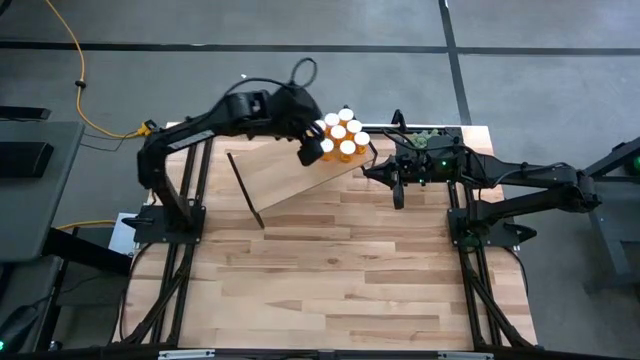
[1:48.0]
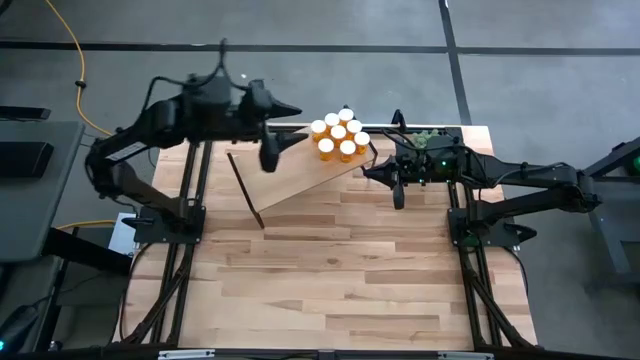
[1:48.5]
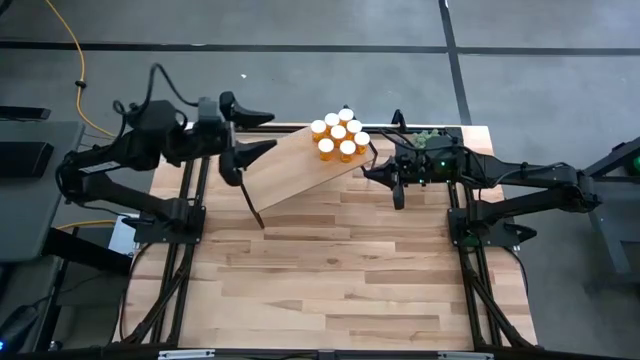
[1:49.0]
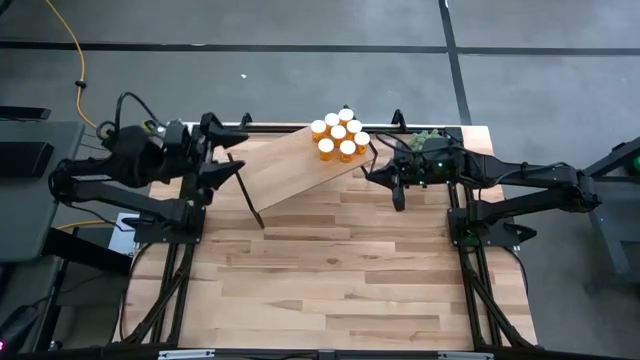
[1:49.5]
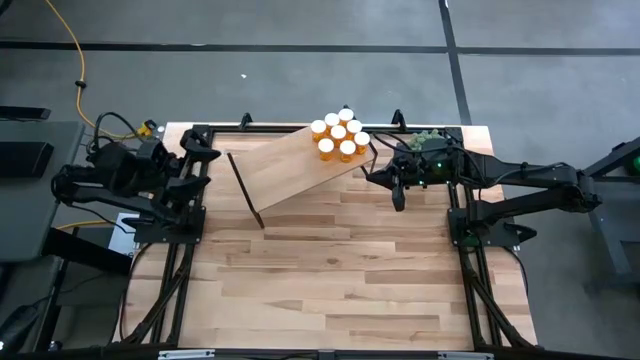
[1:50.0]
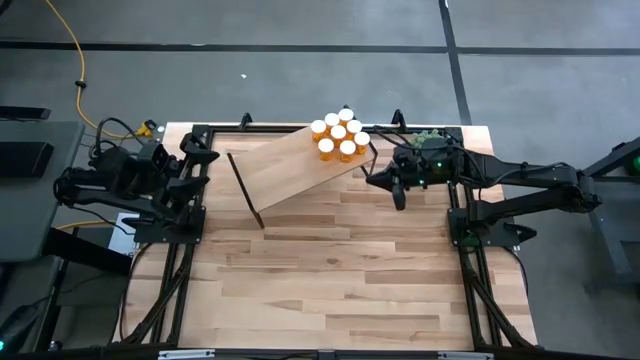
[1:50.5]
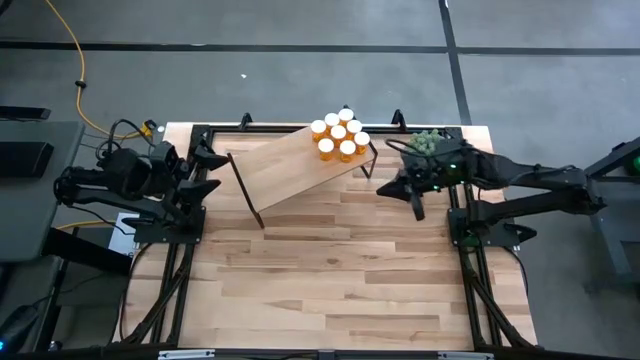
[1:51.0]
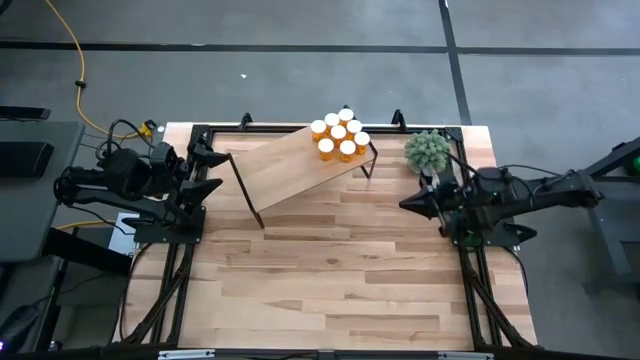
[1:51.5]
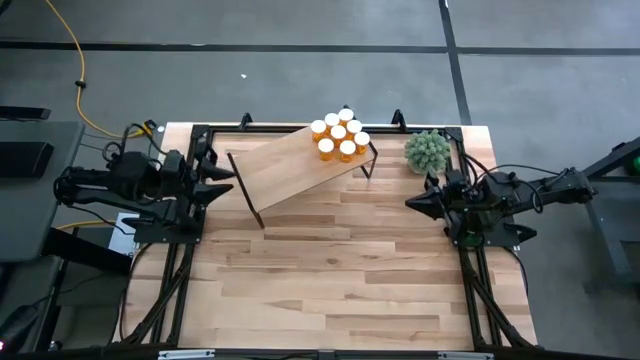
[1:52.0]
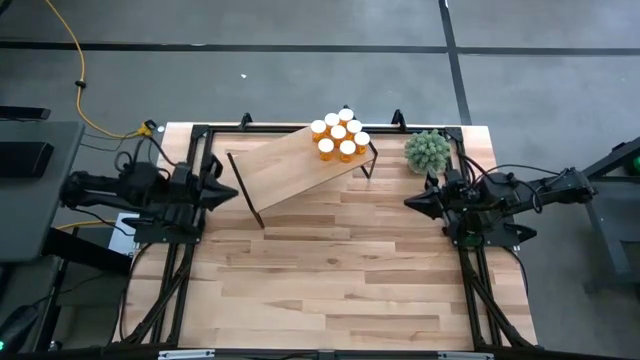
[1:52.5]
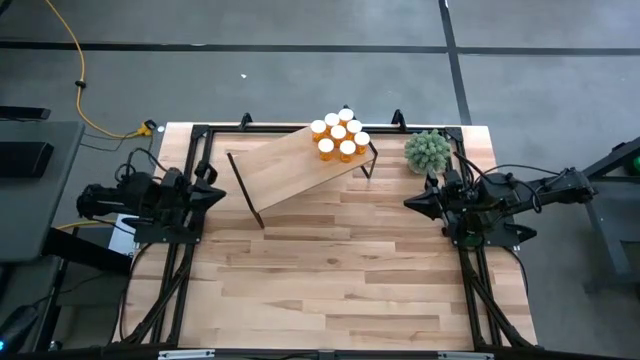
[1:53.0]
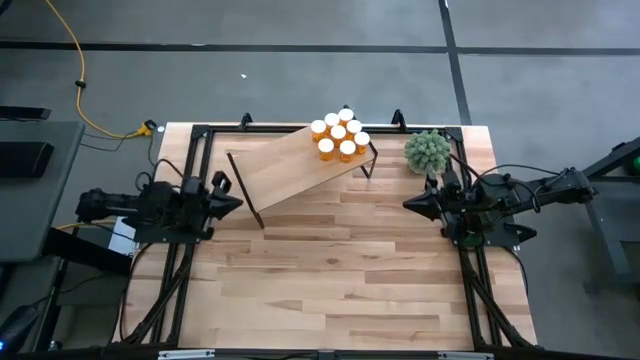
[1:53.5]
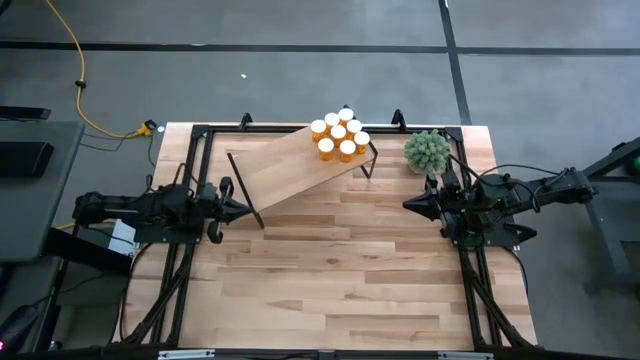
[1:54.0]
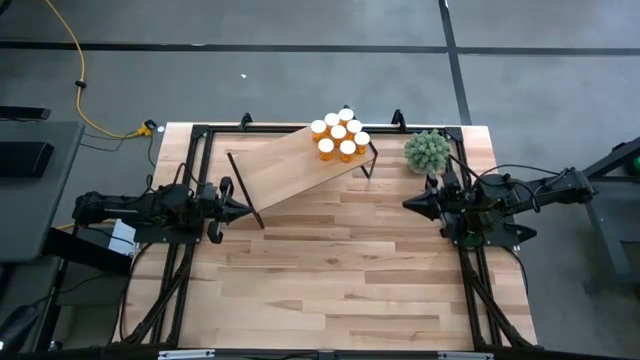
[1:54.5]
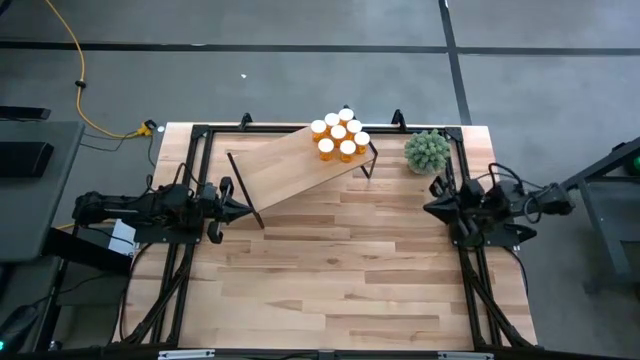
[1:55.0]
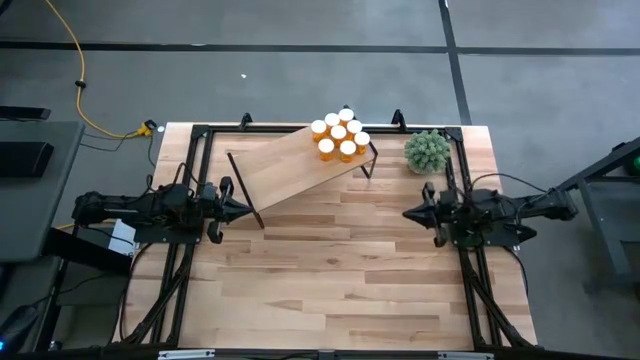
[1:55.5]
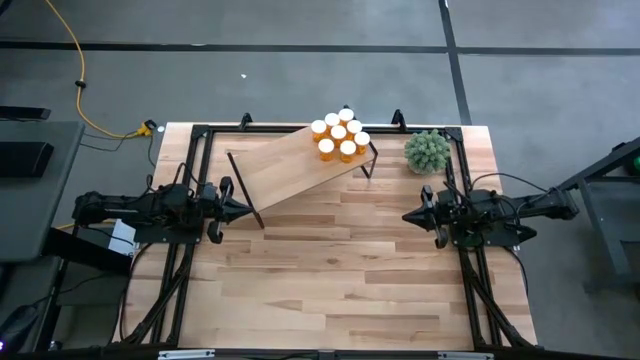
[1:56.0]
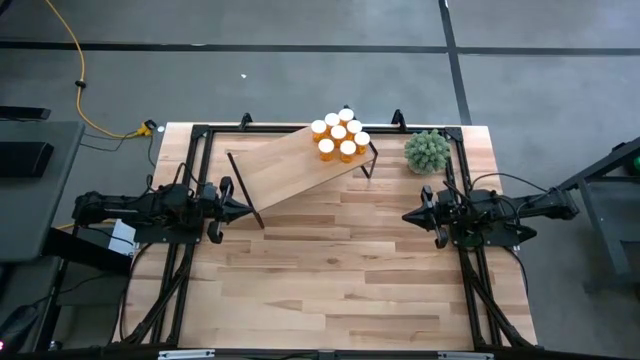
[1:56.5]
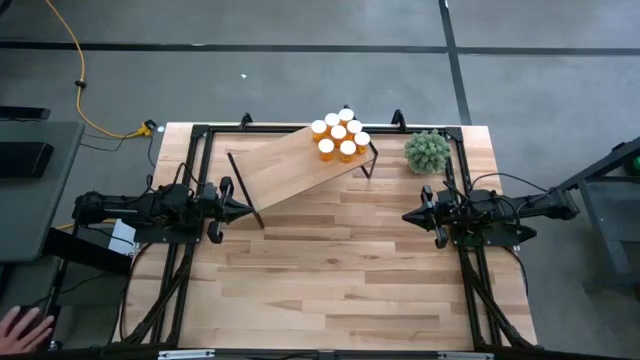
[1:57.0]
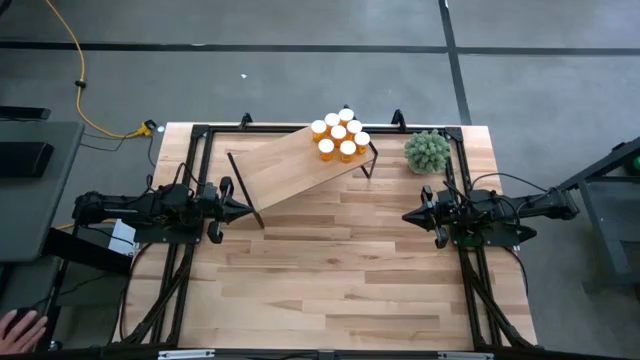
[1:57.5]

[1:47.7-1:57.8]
Task: Pick and place medicine bottles onto shelf by color
Return to Home Position

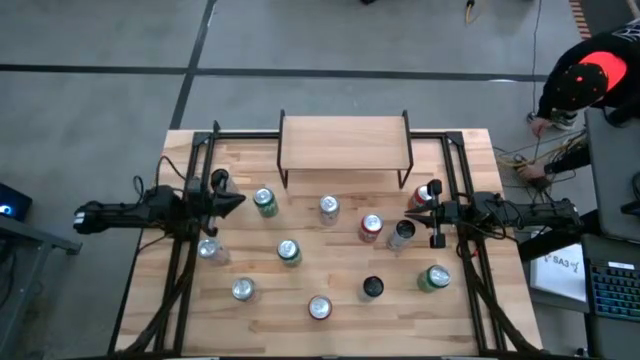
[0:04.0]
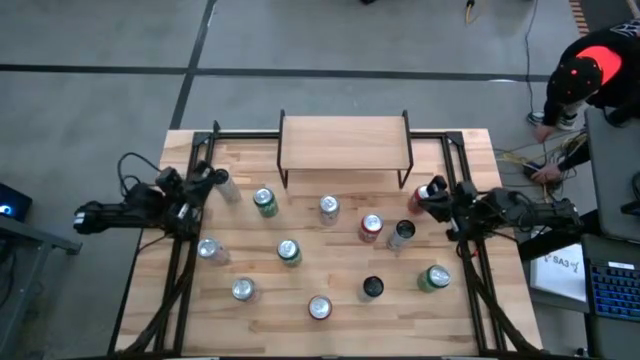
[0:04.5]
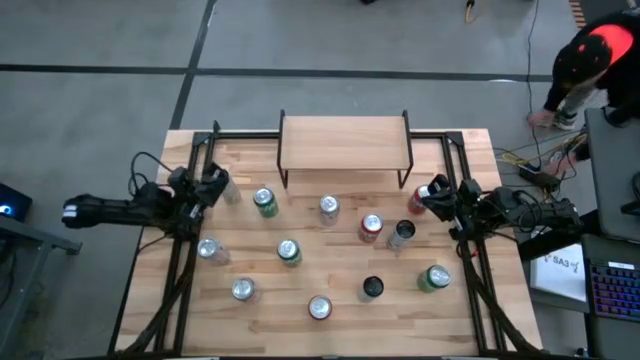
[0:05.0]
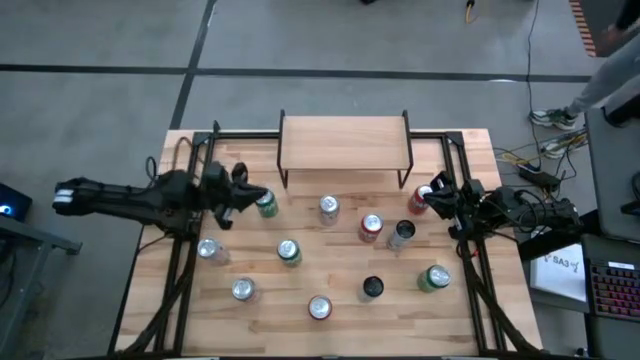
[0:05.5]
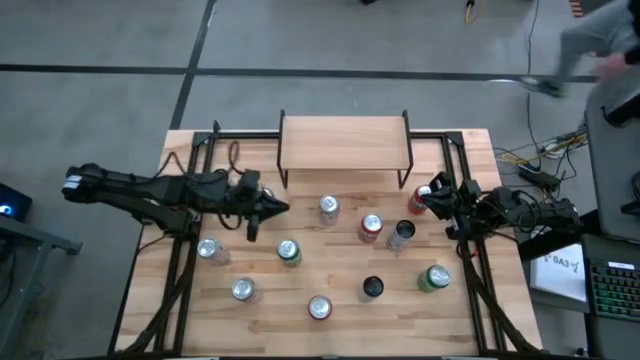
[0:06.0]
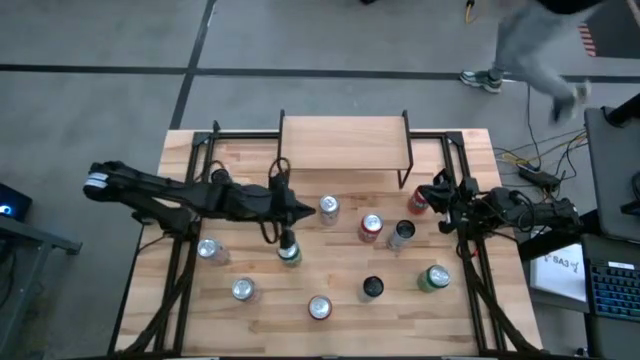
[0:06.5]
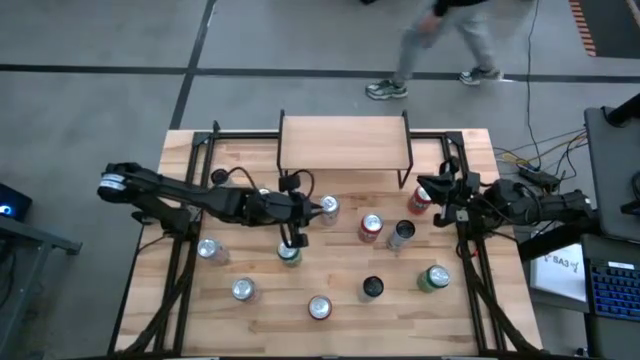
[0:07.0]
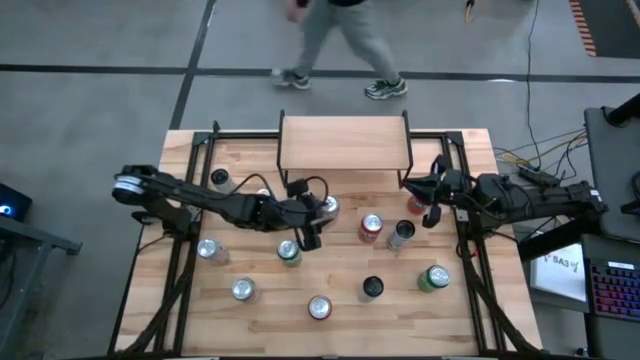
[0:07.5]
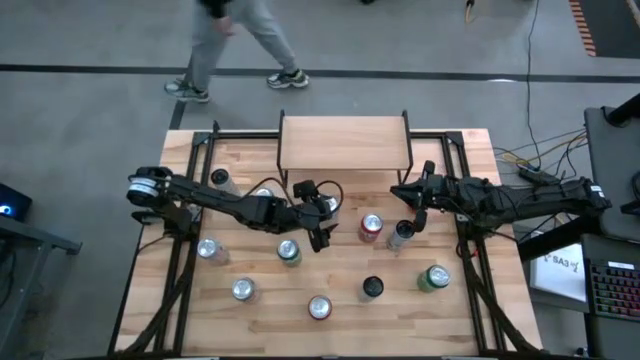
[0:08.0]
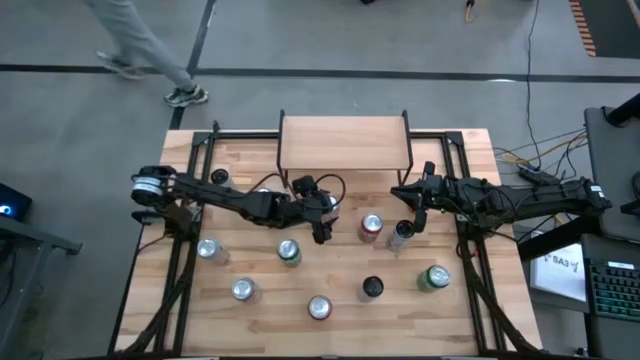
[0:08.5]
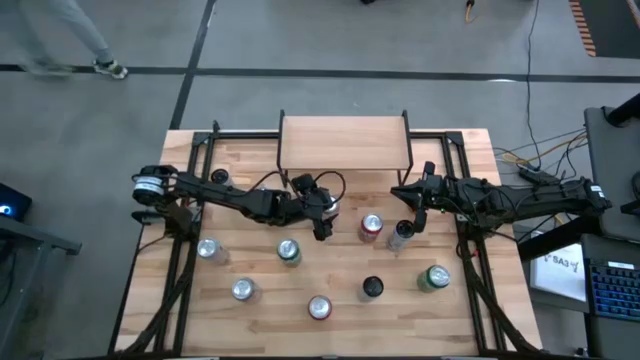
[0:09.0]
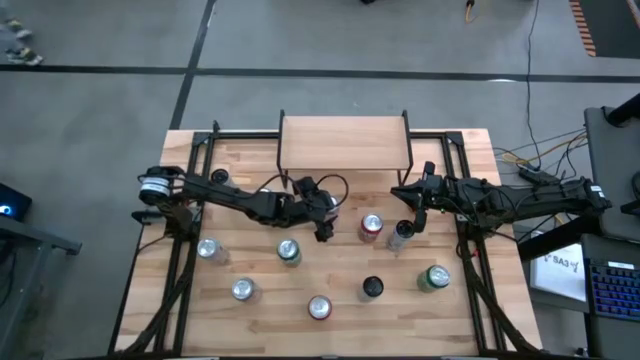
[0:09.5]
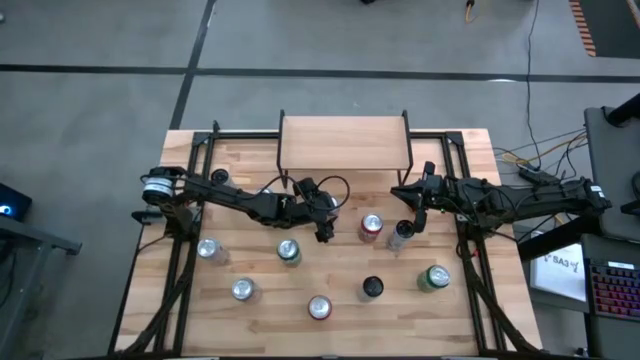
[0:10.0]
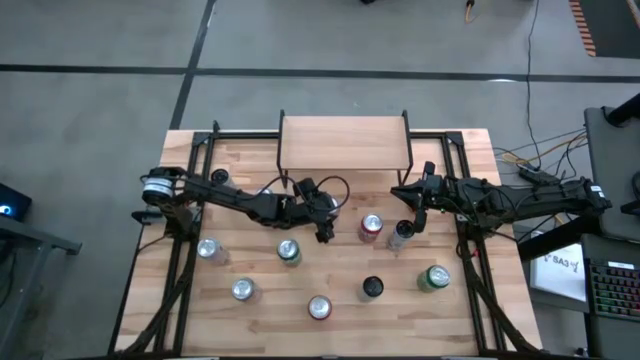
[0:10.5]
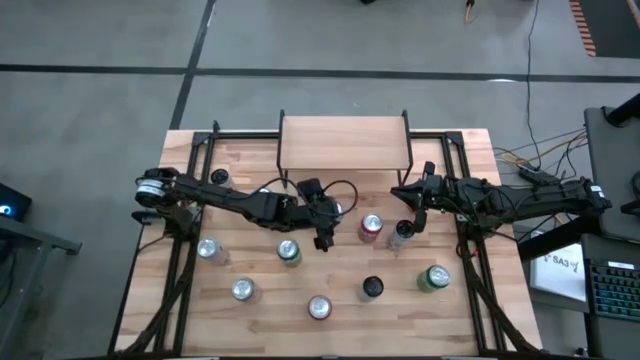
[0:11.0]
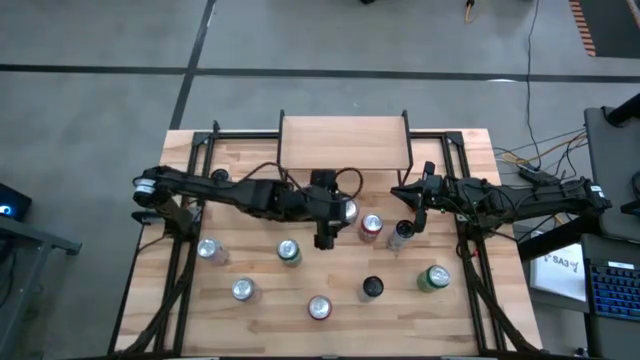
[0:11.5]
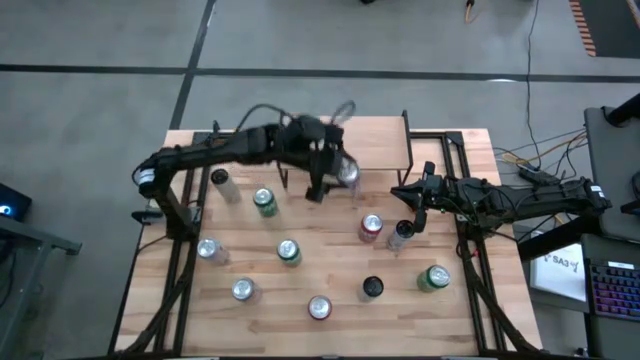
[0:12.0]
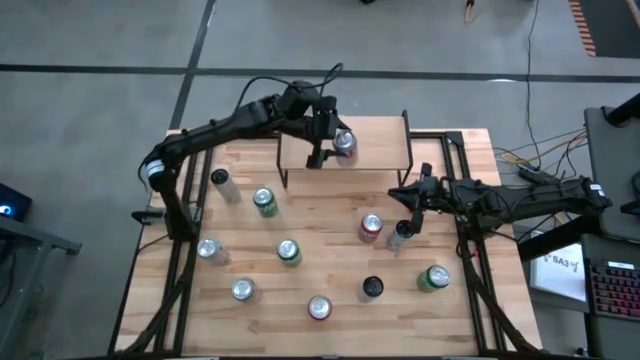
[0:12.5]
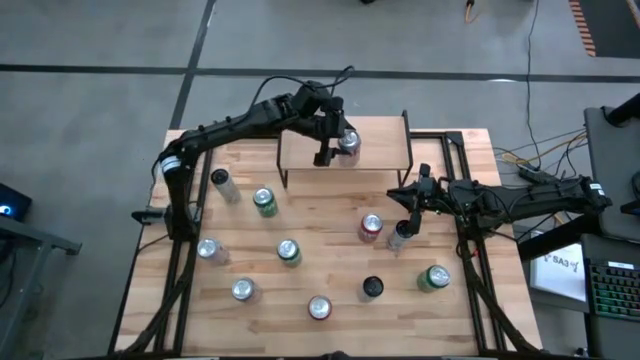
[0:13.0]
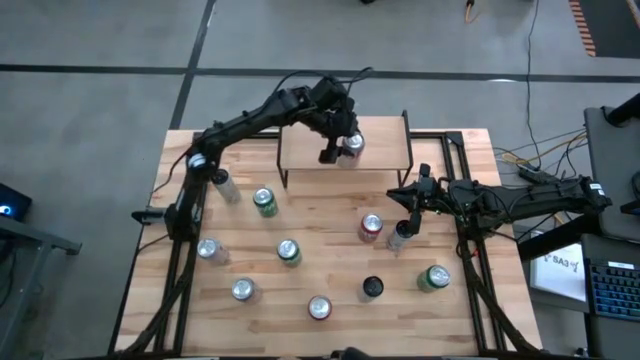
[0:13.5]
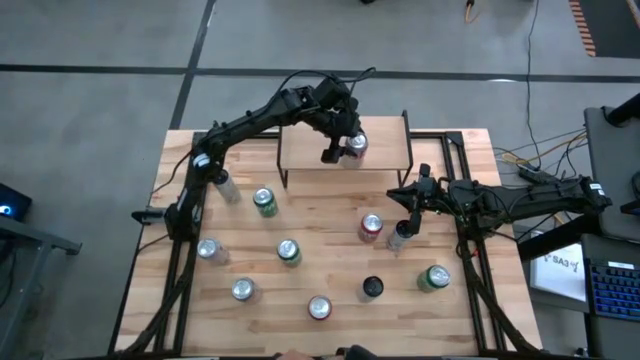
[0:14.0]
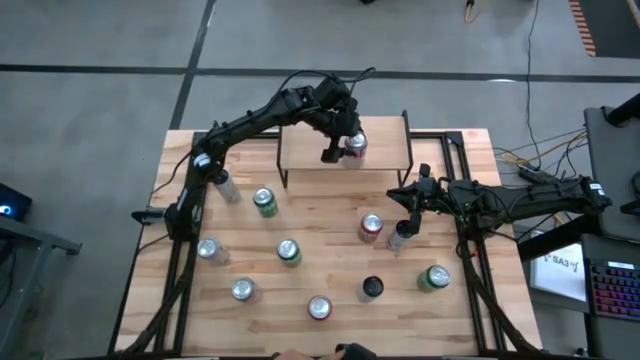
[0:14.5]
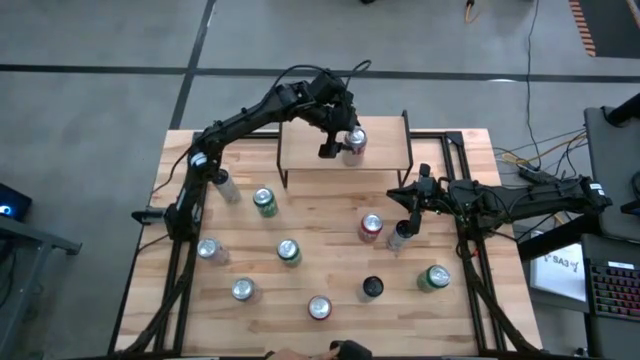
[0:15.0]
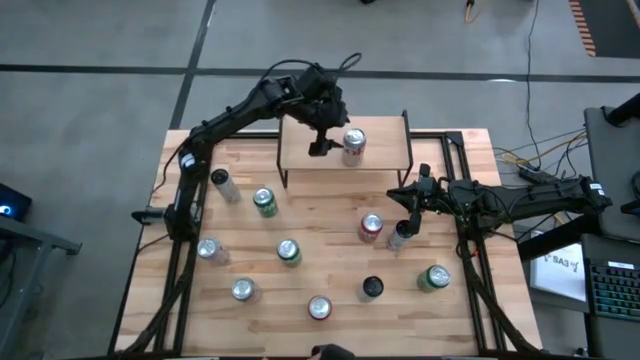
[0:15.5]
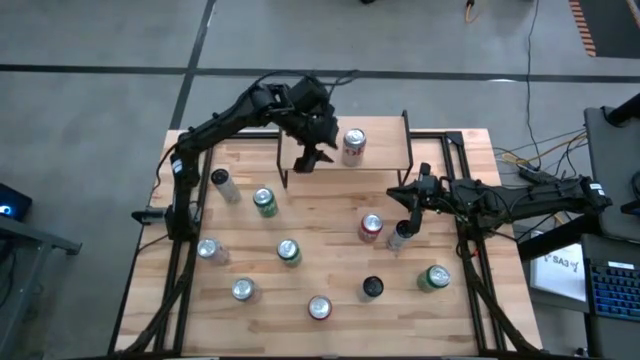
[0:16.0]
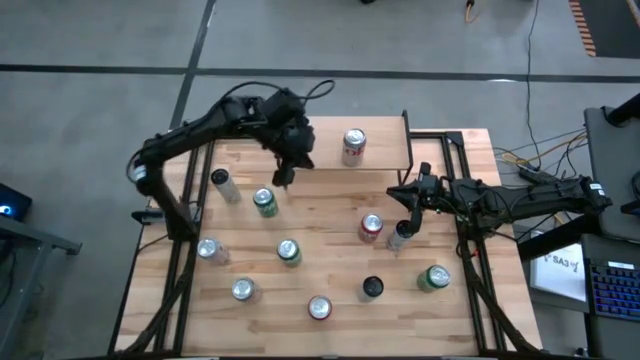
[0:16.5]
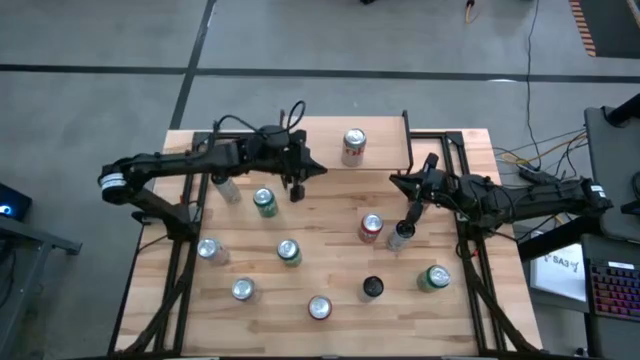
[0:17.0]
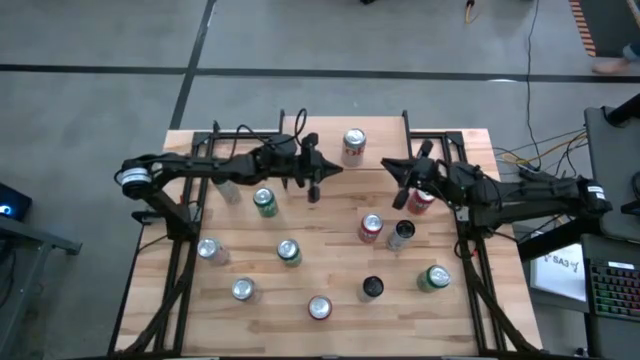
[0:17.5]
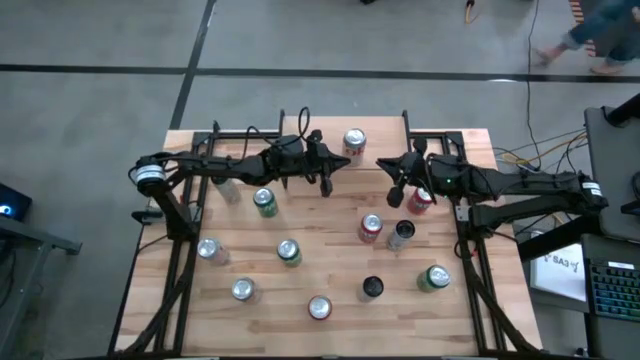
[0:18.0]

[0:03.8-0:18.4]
Task: Place canned beverage on shelf
Put the top white red soda can on the shelf
